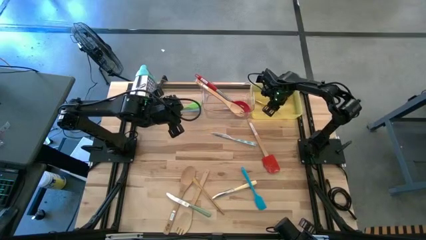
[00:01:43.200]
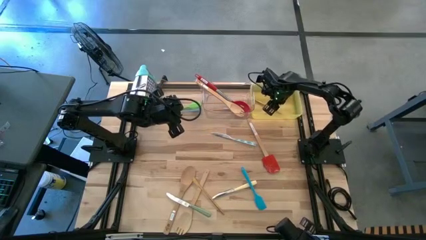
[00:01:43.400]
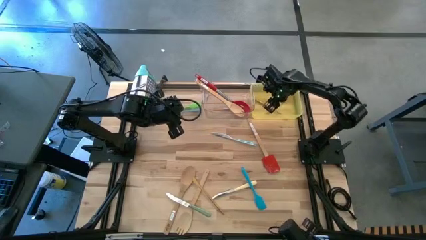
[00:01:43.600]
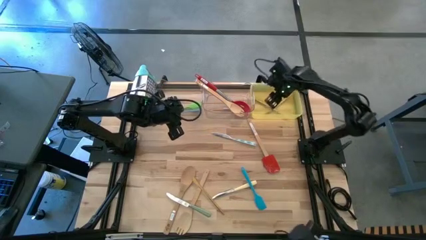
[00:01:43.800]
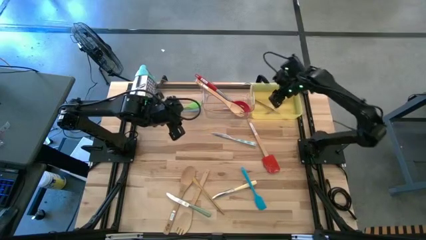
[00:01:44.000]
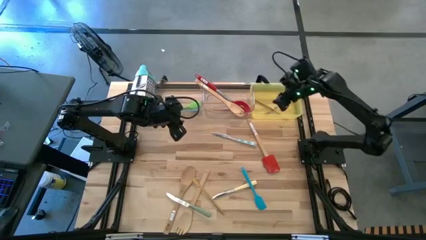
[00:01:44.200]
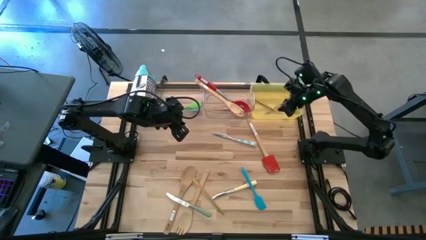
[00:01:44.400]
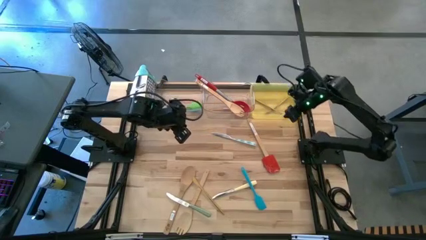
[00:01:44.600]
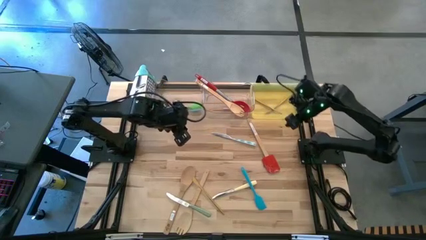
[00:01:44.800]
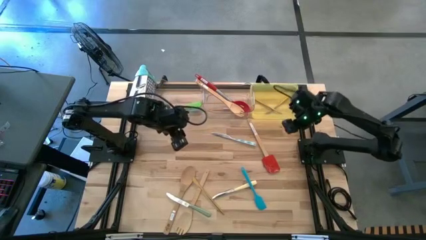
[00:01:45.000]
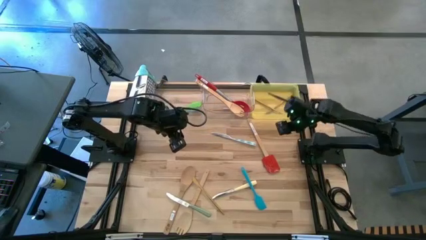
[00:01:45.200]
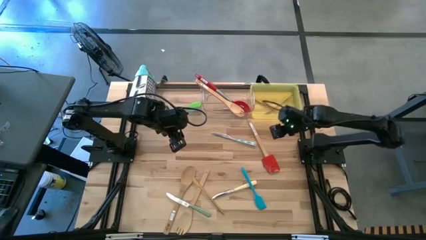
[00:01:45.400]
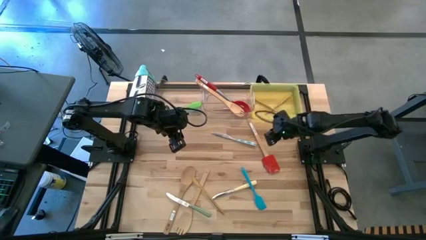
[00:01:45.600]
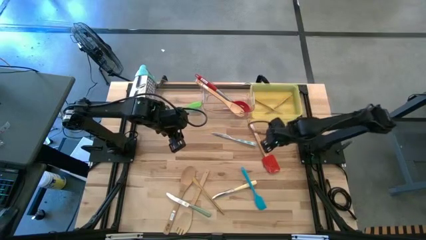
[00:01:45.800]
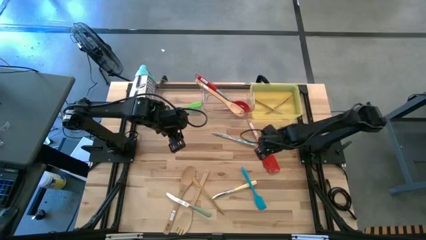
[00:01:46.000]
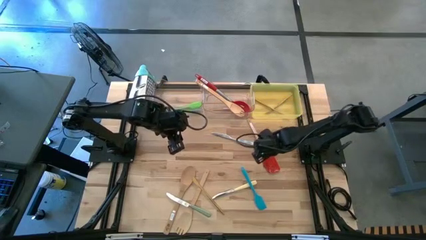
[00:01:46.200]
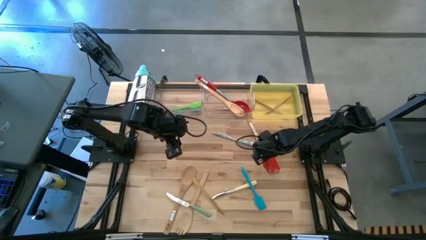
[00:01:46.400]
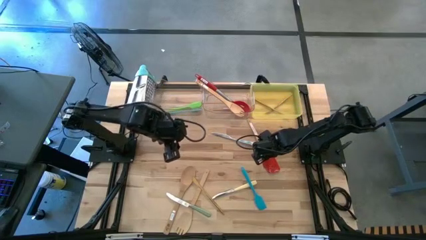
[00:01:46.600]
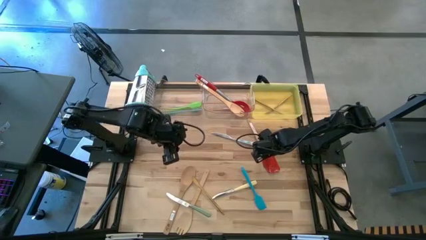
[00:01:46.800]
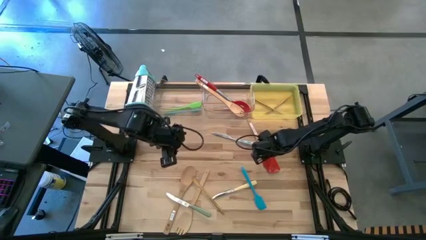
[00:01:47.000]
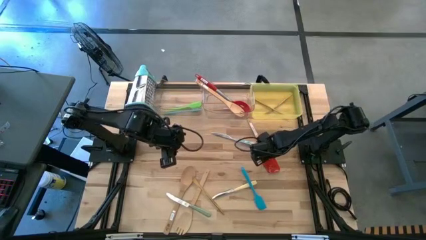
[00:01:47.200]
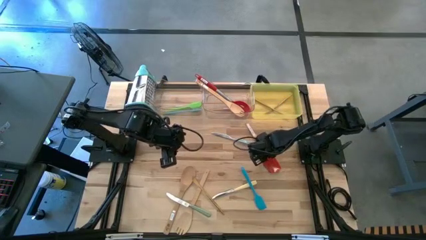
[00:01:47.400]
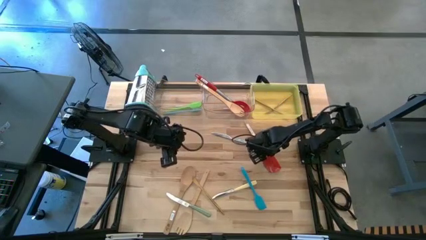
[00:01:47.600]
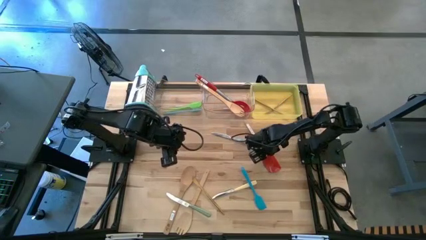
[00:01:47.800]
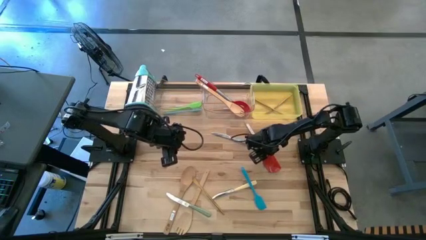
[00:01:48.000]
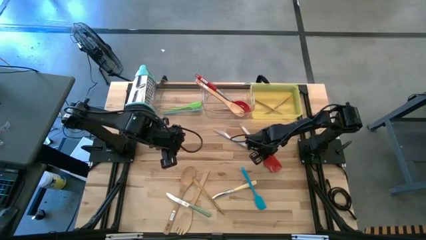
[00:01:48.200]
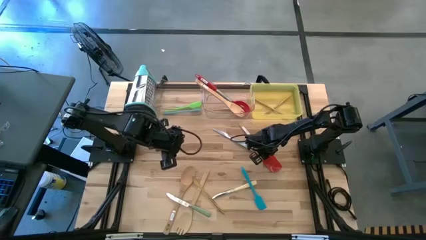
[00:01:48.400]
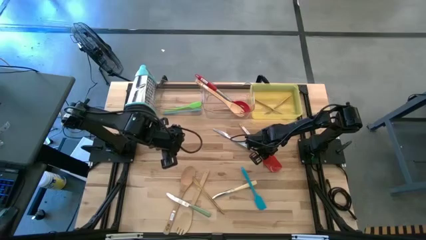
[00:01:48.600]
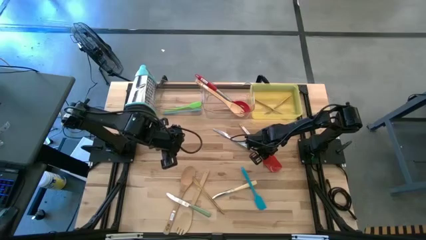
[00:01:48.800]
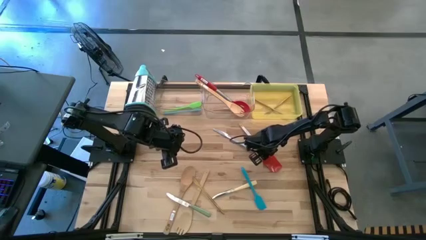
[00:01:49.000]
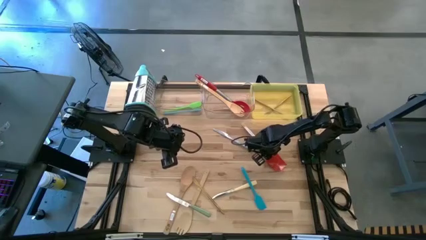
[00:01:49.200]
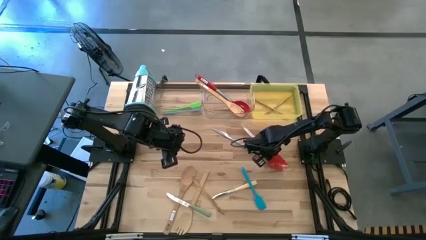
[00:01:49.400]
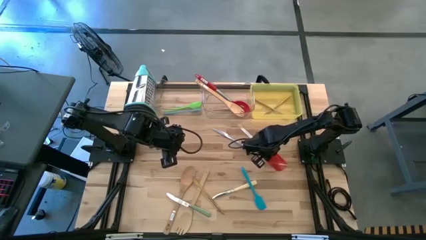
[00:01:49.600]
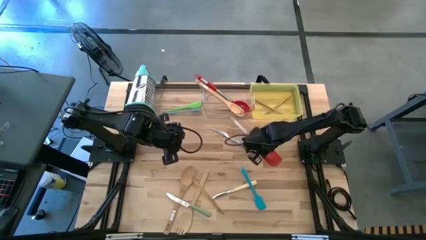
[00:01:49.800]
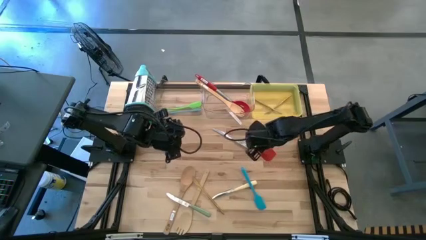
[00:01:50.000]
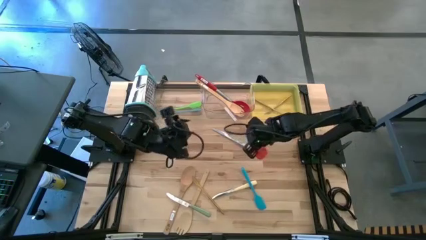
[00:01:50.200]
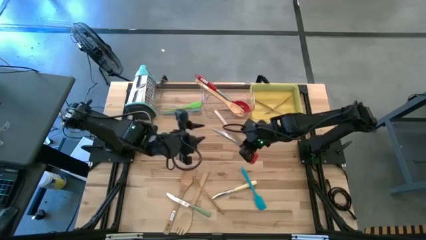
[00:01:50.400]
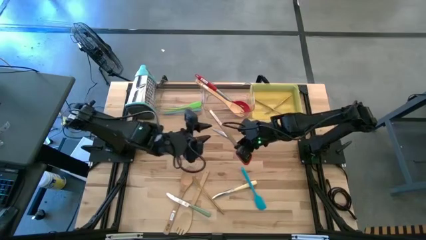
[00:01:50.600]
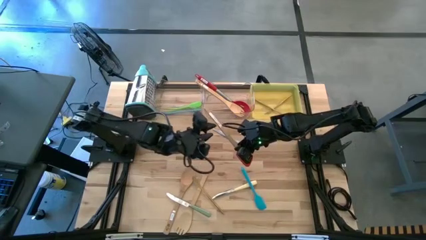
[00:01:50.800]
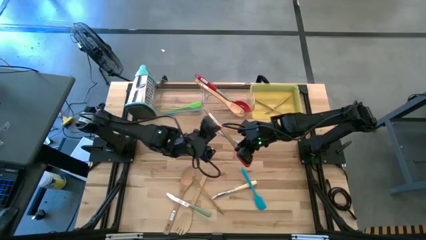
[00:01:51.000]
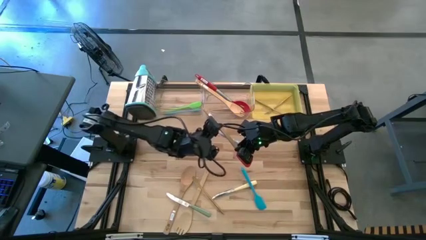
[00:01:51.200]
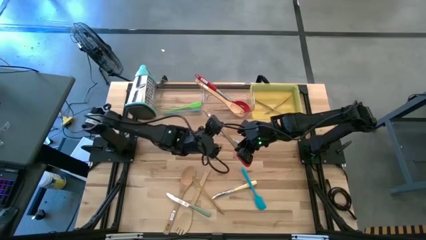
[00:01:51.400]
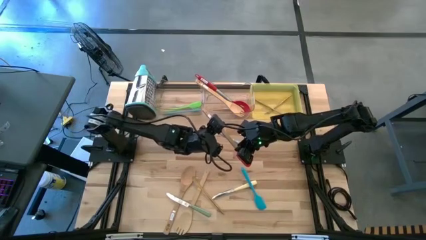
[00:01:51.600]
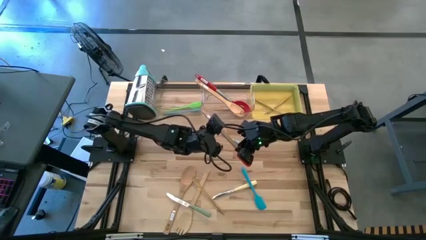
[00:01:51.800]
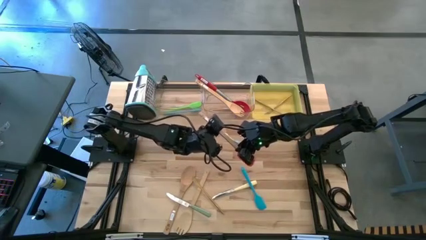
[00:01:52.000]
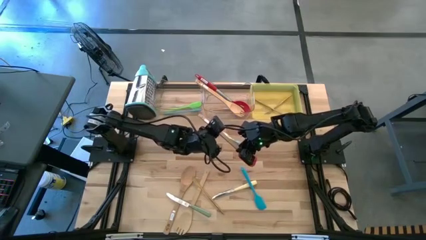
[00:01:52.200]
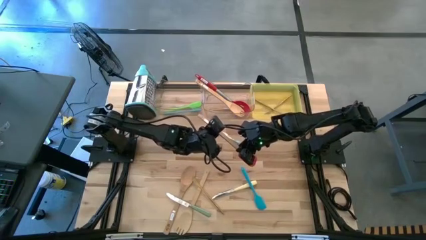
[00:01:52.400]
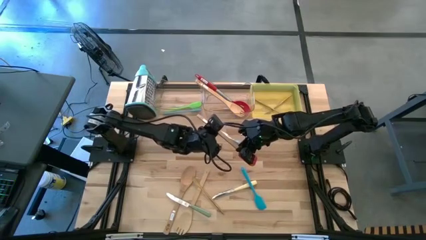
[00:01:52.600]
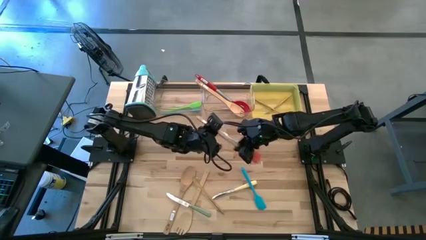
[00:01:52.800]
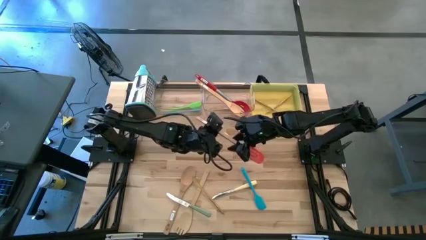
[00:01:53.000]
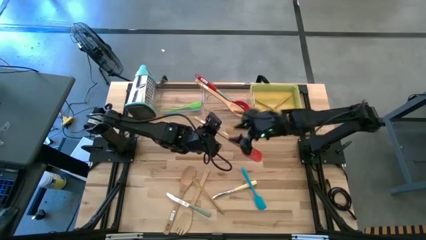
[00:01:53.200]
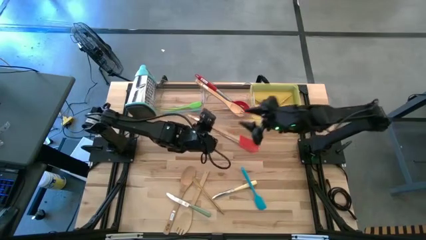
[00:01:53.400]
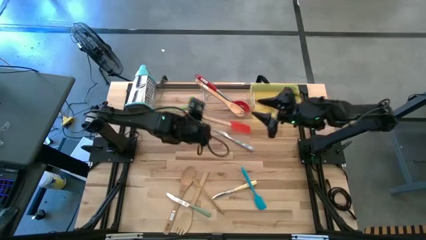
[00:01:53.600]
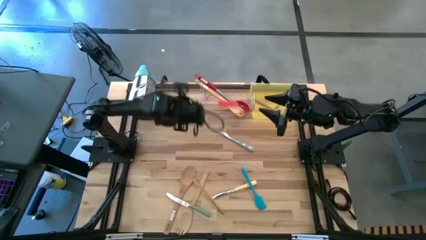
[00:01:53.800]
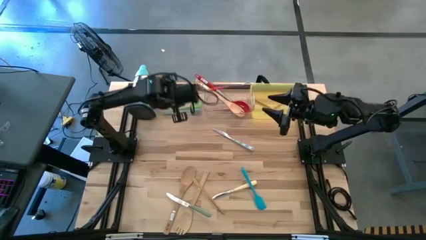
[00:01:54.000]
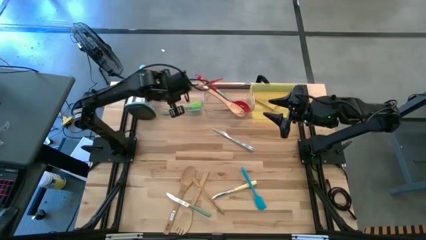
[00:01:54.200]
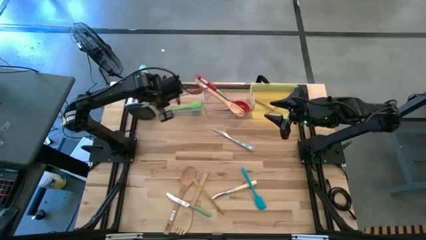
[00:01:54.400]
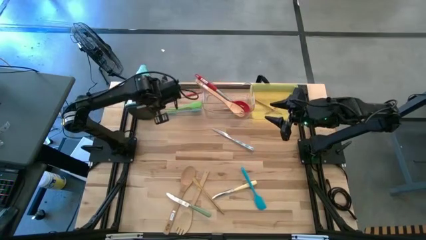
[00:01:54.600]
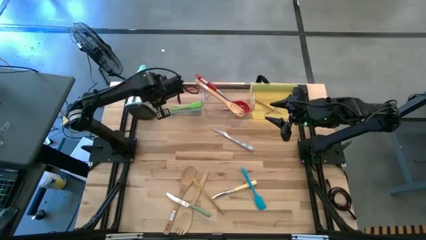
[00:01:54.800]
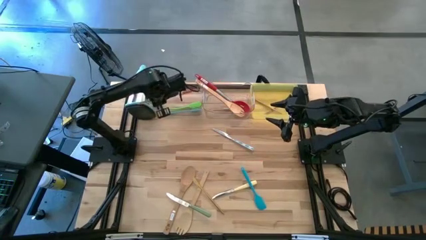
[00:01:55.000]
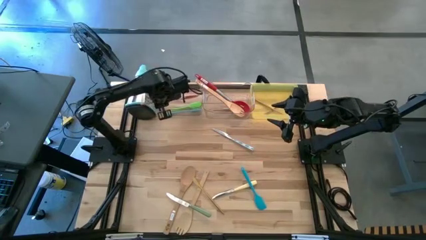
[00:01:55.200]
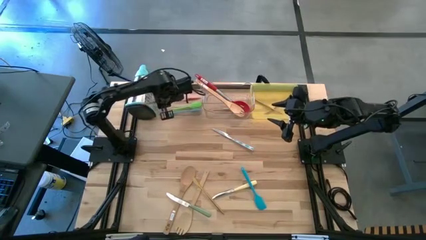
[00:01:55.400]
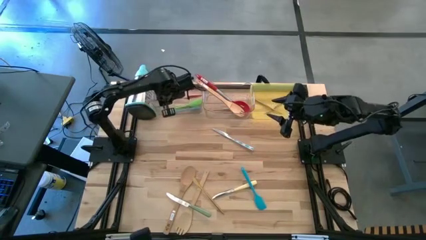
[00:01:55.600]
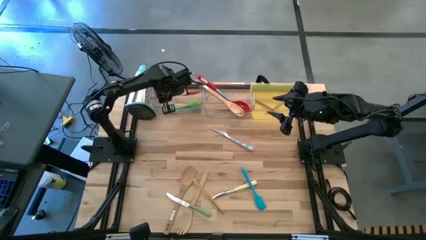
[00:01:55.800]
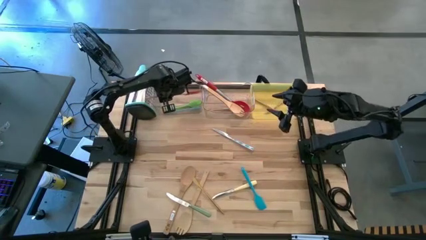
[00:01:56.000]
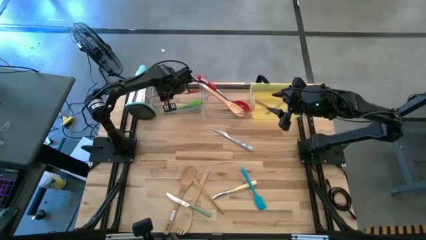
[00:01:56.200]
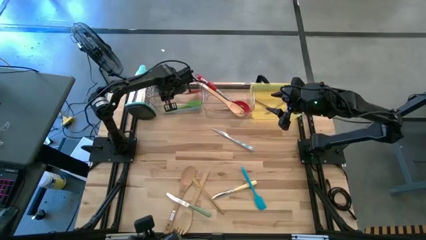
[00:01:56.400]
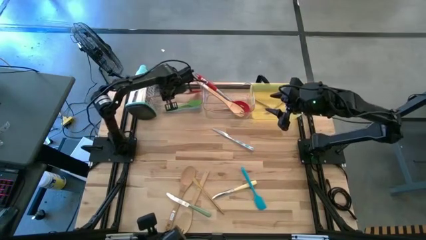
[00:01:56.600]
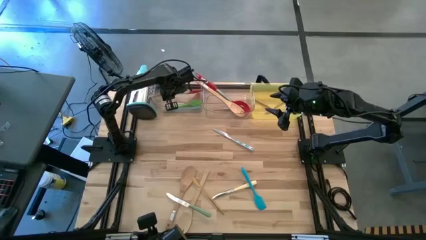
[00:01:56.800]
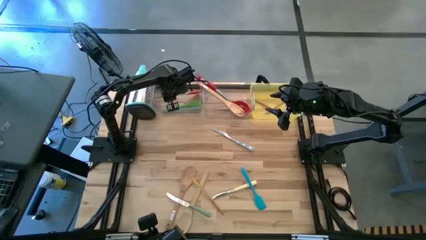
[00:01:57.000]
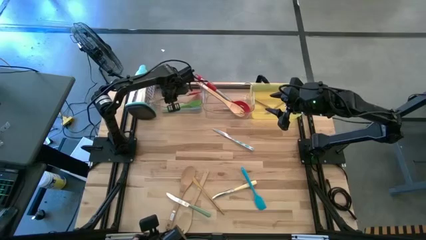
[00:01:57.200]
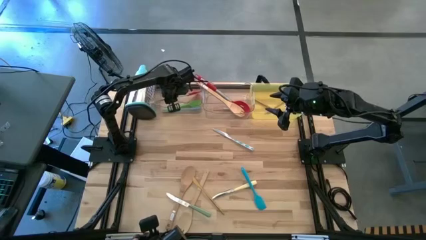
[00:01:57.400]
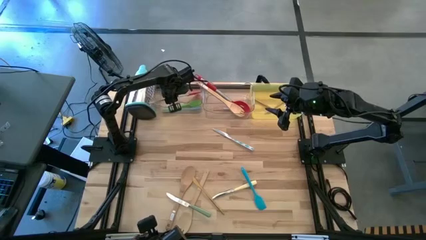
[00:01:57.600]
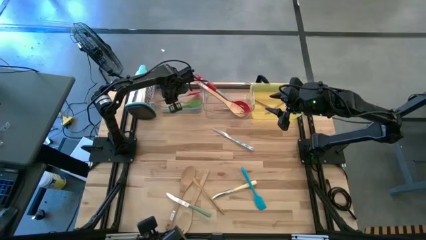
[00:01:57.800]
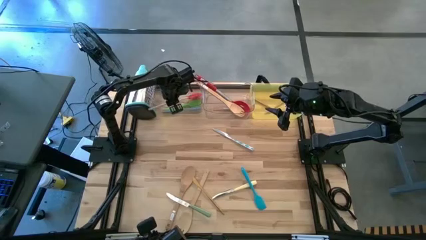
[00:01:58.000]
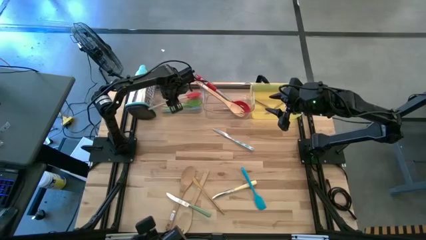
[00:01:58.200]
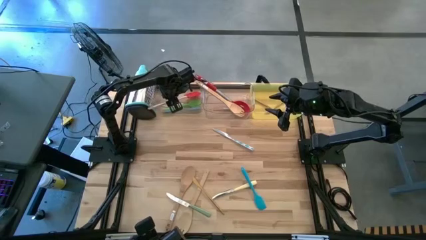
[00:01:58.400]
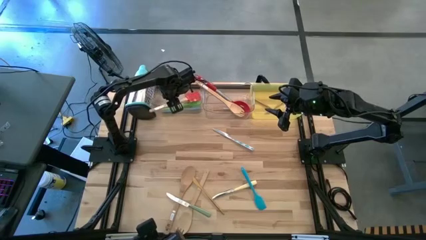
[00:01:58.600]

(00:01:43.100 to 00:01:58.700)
Task: Pick & Place Kitchen Items
Put the red spatula into the left transparent bin

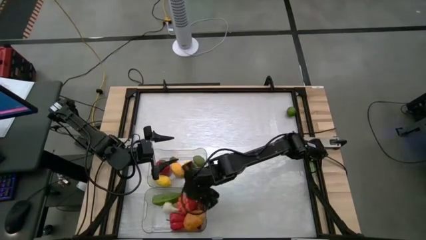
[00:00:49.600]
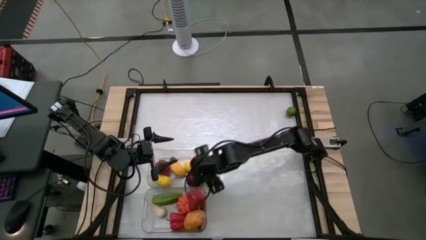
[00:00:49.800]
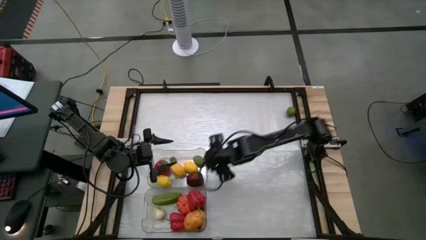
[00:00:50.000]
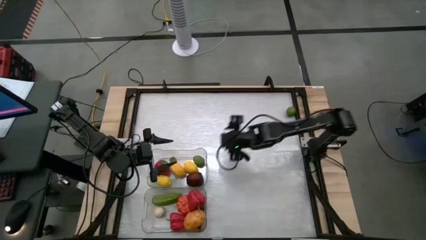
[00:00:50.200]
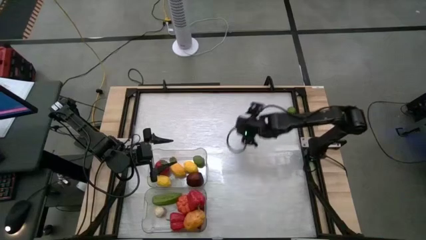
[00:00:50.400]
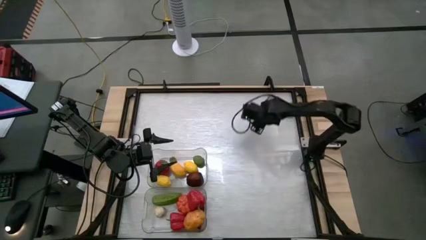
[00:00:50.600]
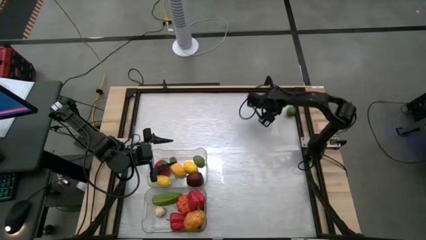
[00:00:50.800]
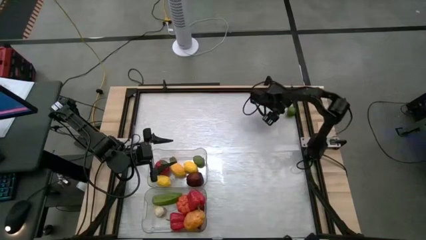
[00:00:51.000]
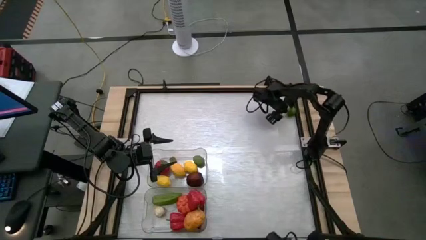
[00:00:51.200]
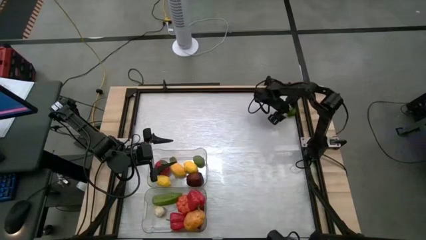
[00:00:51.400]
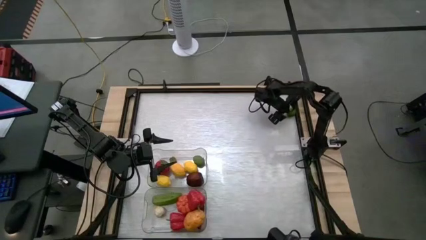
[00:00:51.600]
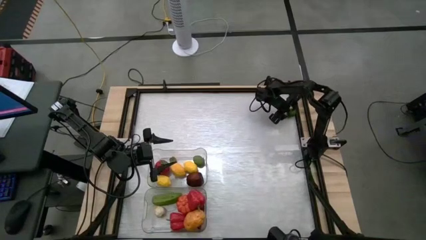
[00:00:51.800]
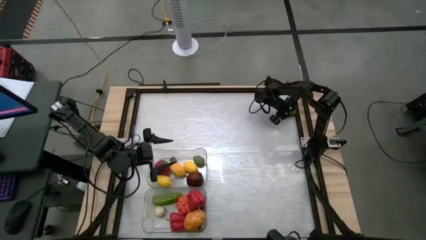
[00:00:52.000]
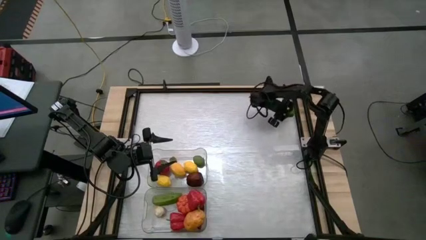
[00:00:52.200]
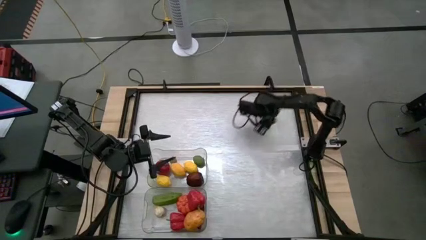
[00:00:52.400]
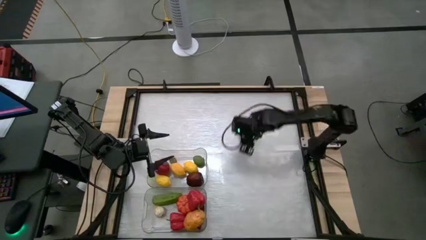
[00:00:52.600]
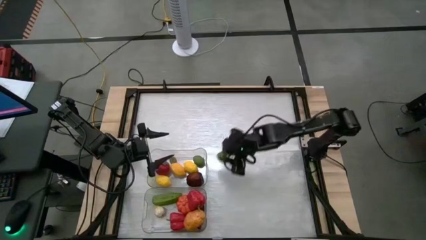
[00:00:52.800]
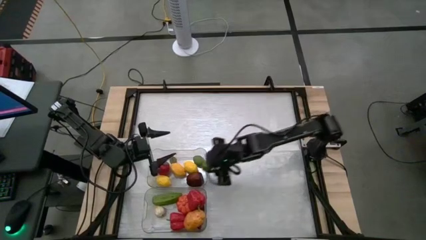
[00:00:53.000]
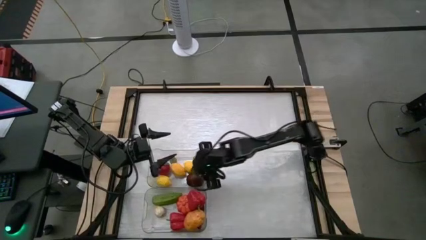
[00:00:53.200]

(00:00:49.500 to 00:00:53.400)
Task: Sort produce into baskets
Put the green lemon into the top transparent bin
